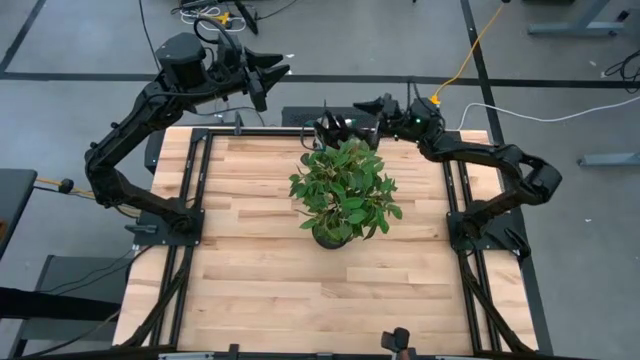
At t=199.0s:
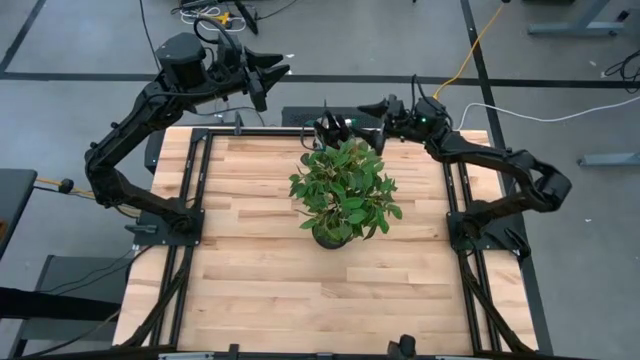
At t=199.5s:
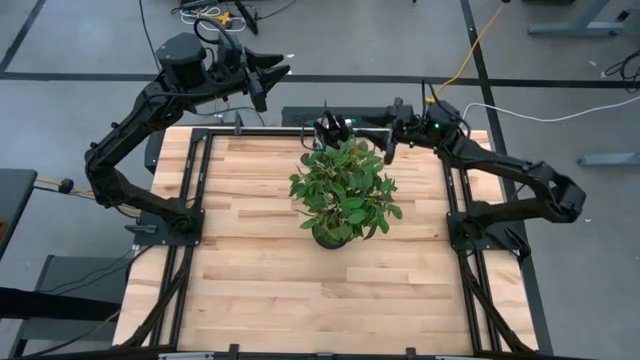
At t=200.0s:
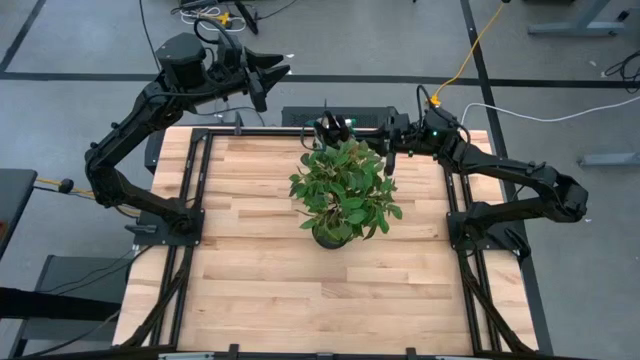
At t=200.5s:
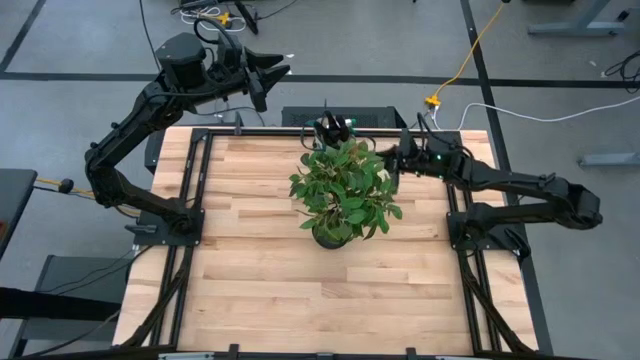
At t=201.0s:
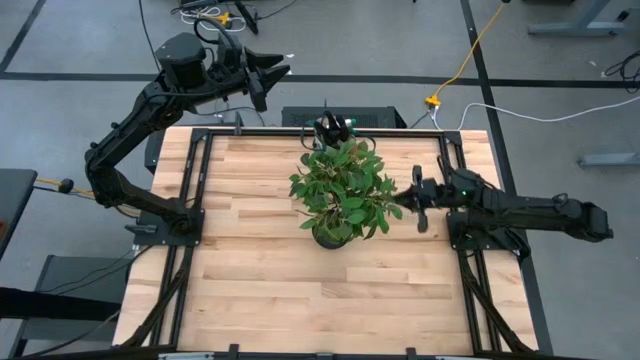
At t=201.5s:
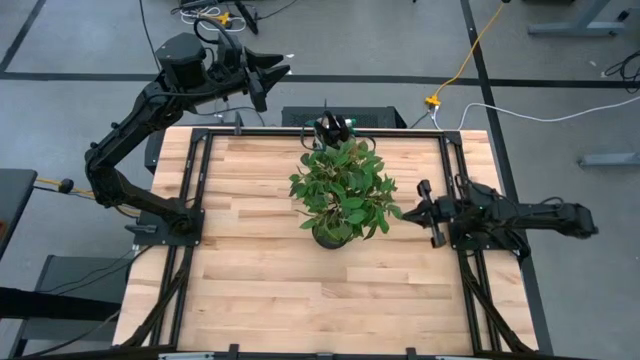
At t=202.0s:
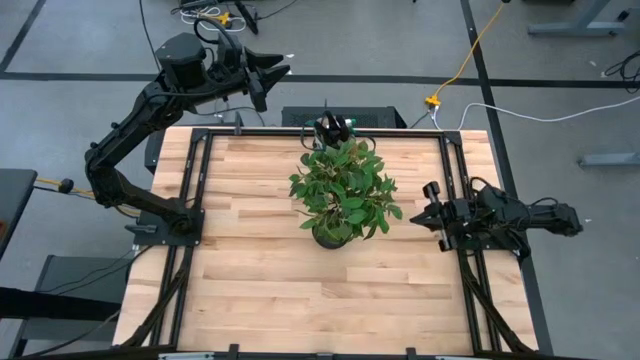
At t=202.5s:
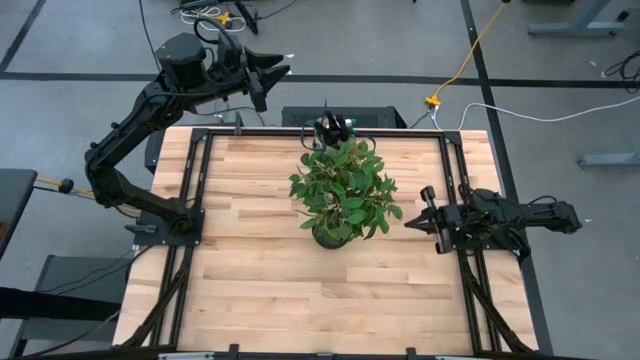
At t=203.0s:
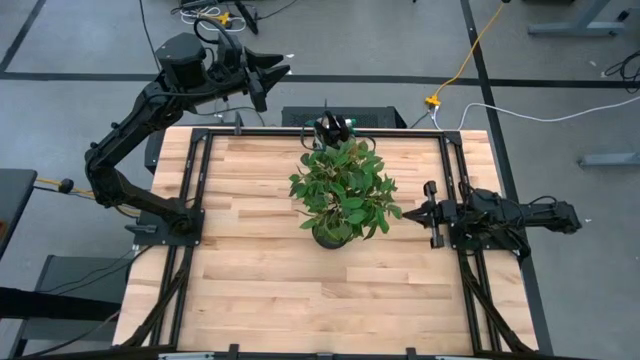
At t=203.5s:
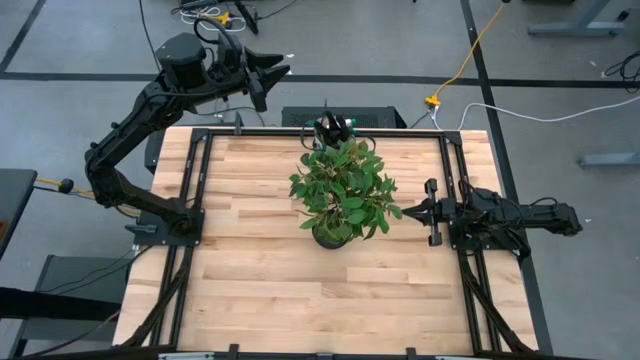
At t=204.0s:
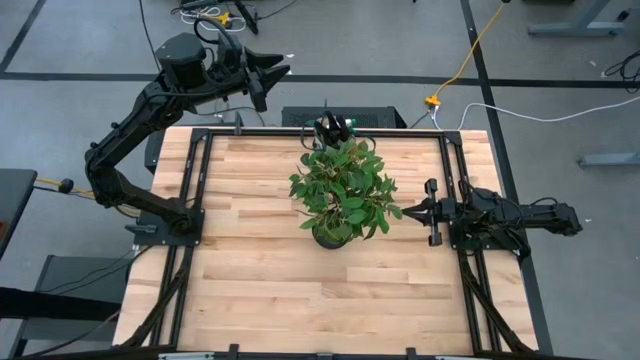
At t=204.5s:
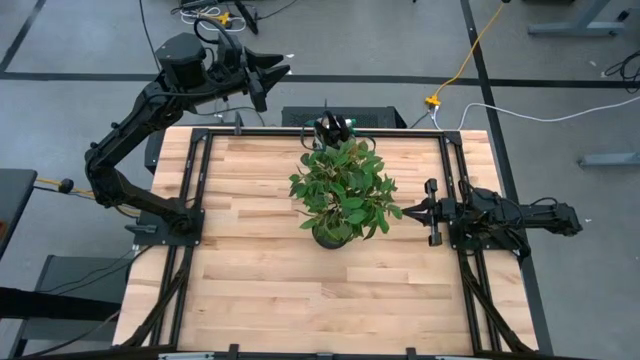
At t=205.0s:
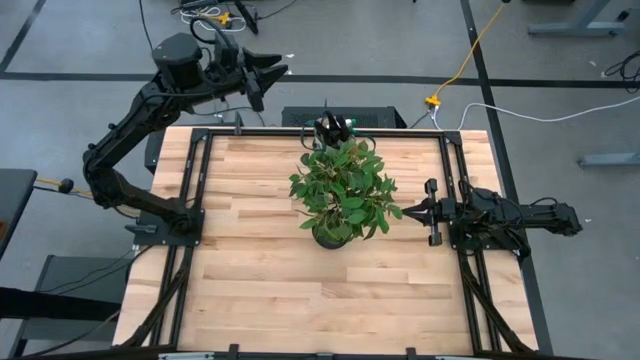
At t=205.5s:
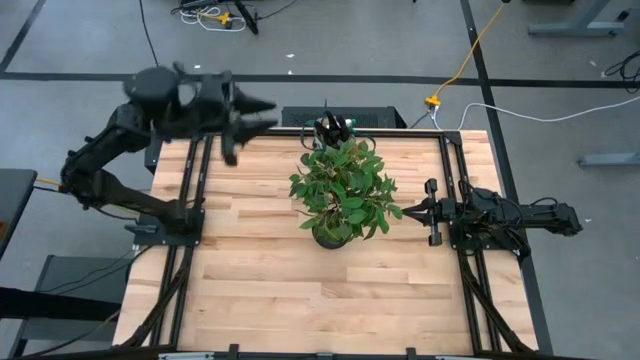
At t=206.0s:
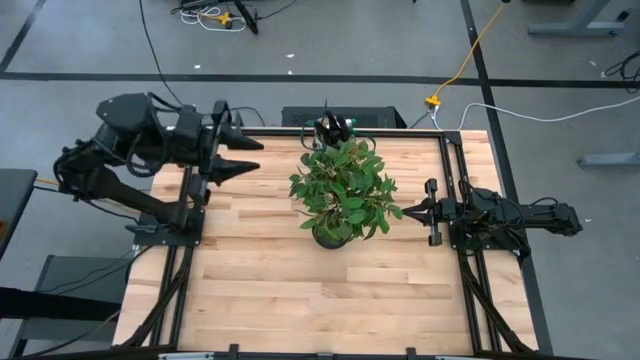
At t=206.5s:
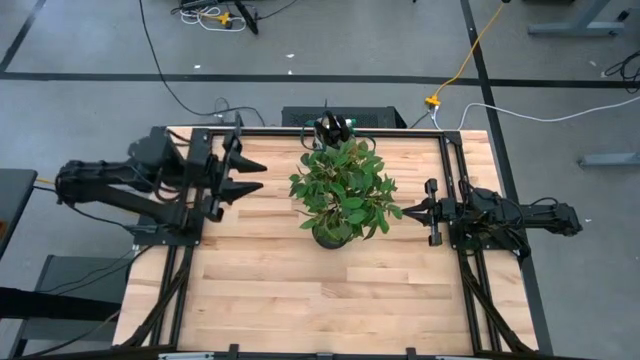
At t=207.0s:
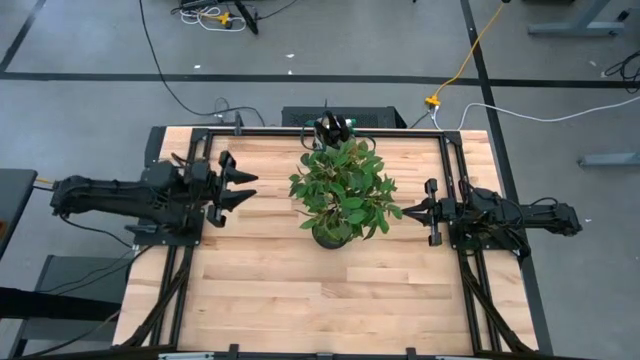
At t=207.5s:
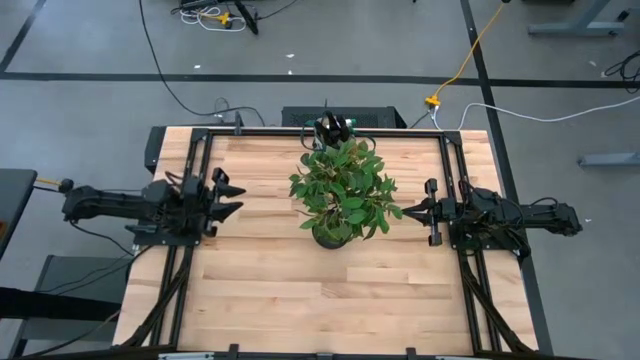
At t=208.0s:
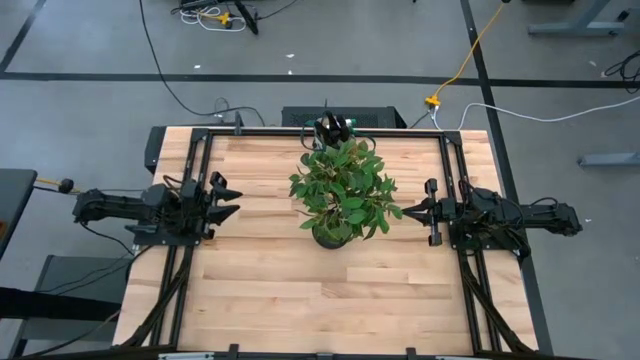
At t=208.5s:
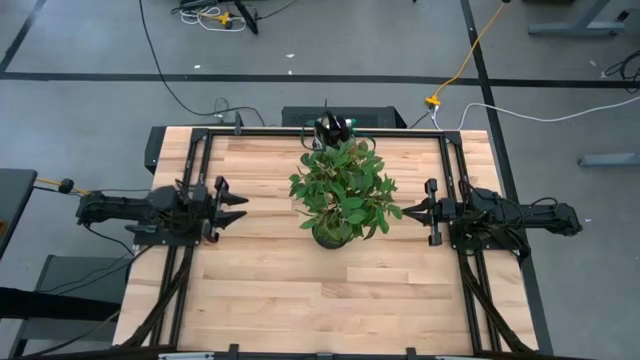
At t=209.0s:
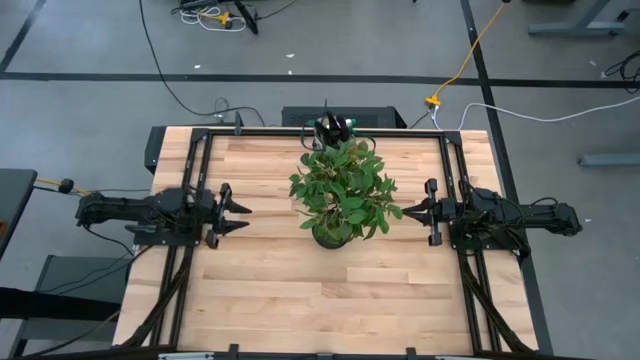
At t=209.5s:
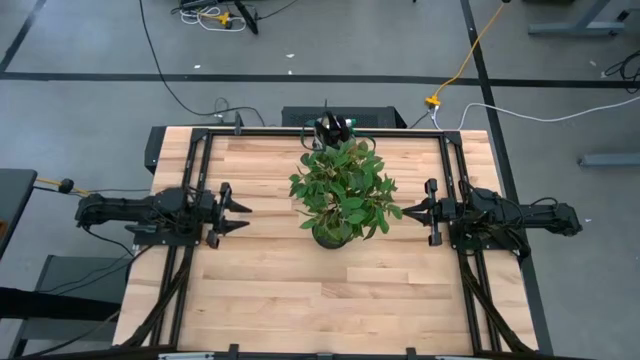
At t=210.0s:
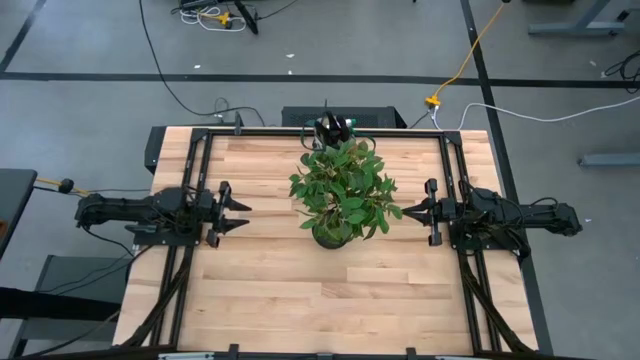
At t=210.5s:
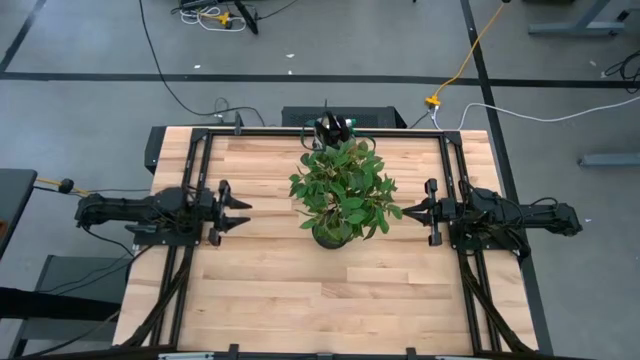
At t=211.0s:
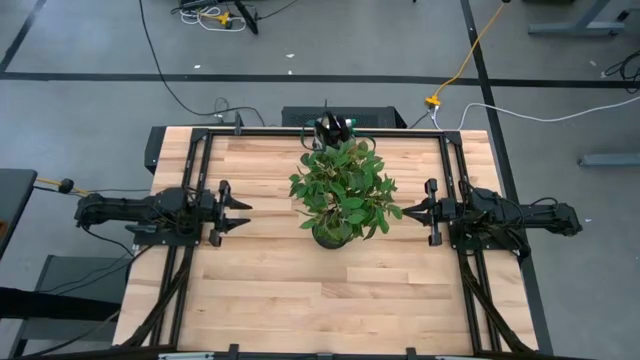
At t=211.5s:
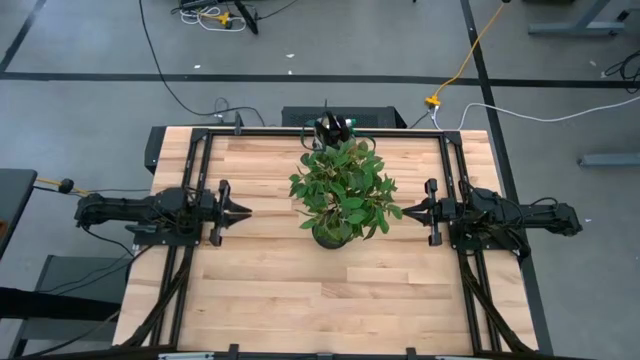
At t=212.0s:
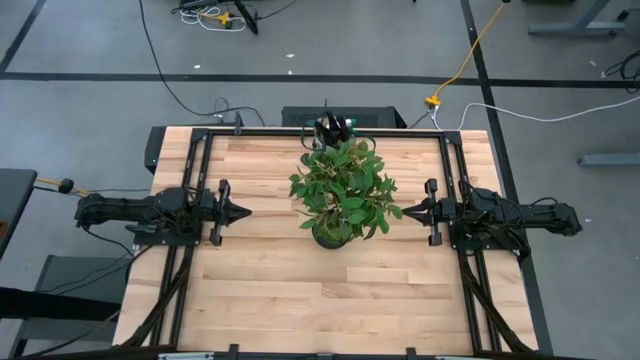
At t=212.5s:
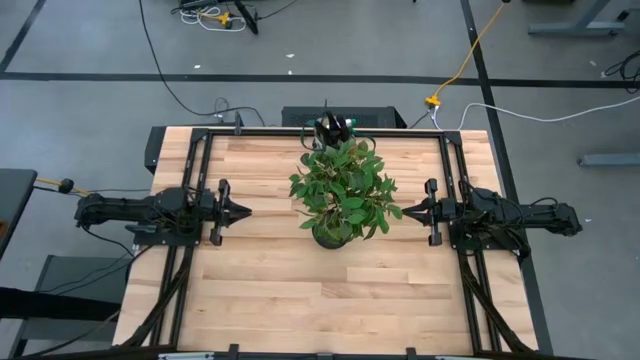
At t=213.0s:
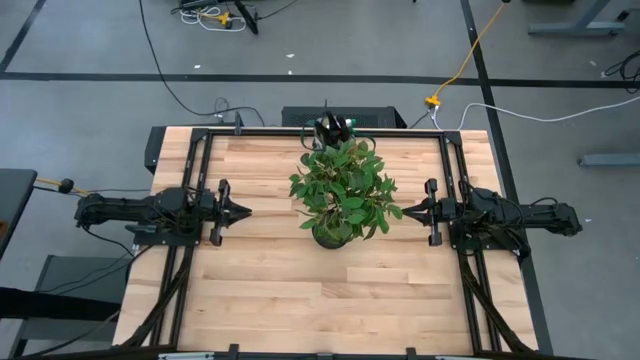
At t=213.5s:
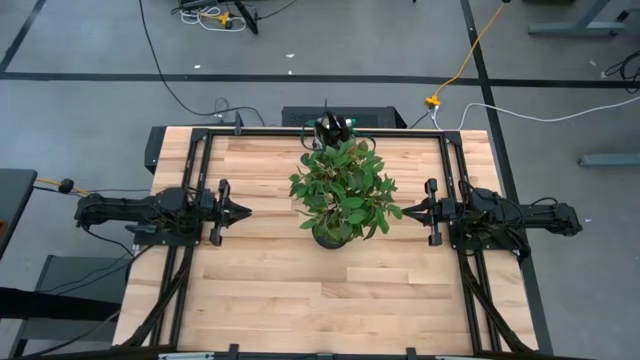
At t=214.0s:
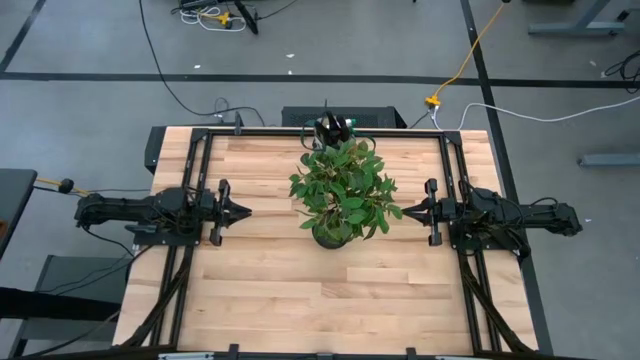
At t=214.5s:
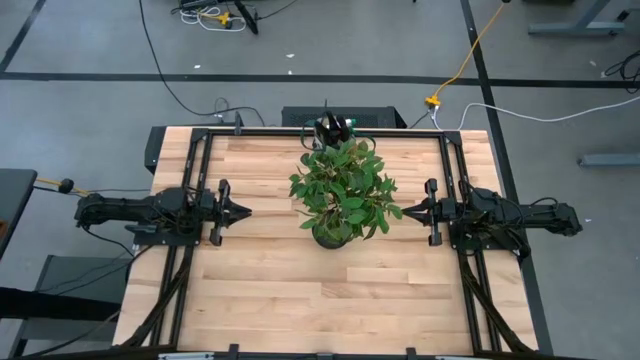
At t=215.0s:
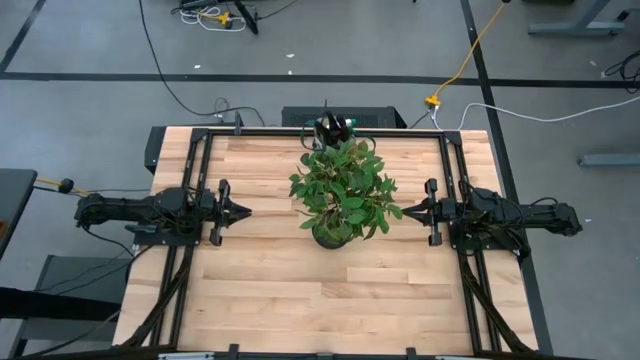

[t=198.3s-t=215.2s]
Task: Pick & Place Garden tools in Gardening bag
Return to Home Position

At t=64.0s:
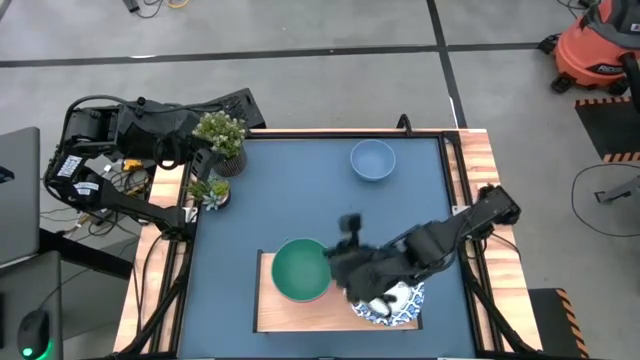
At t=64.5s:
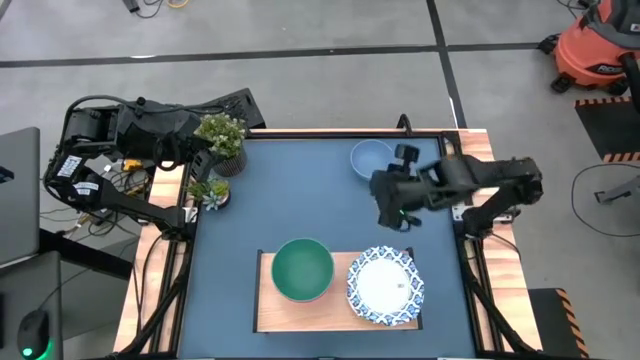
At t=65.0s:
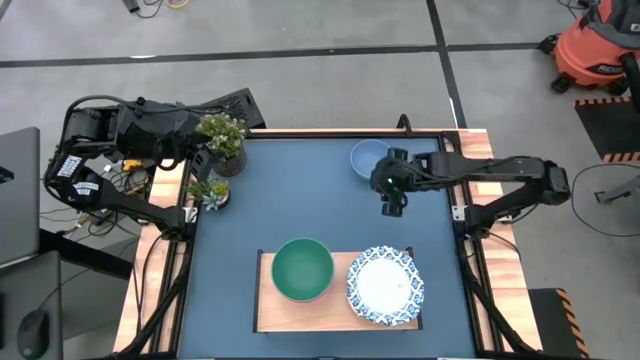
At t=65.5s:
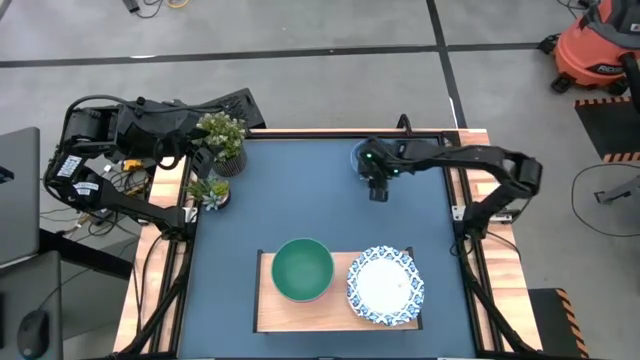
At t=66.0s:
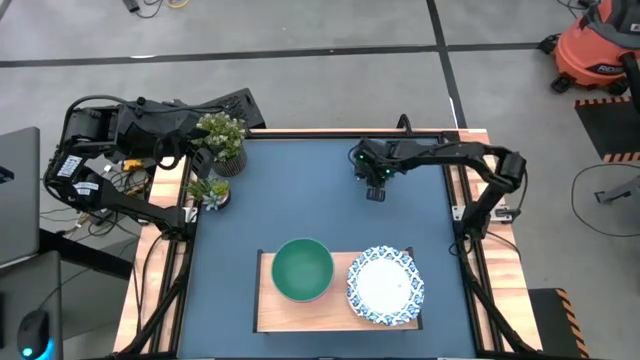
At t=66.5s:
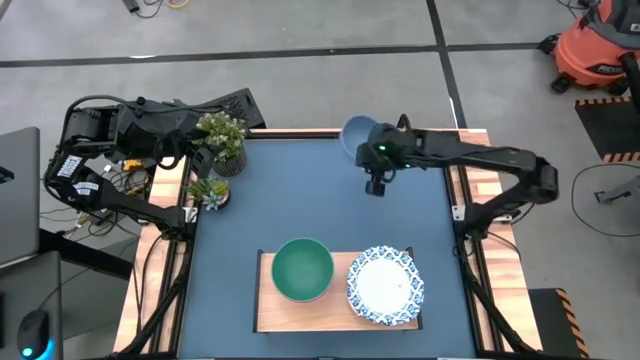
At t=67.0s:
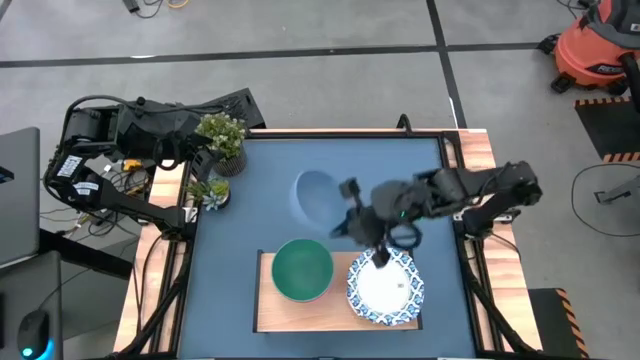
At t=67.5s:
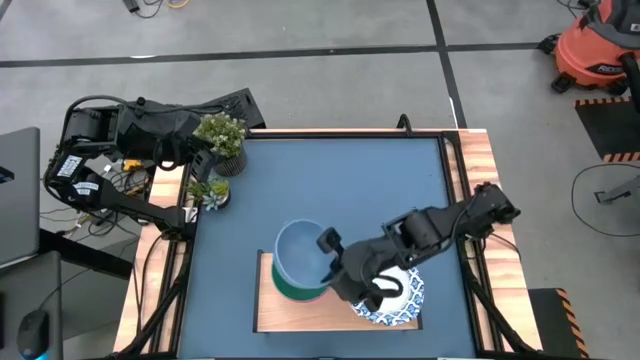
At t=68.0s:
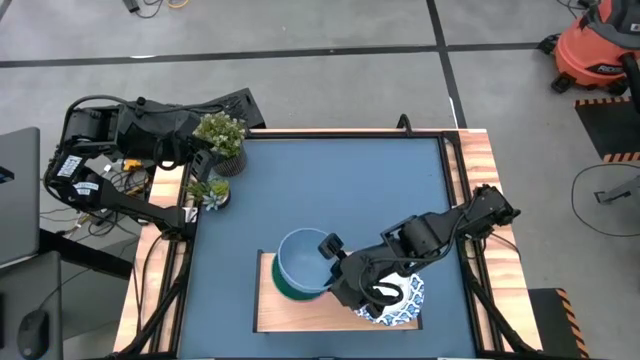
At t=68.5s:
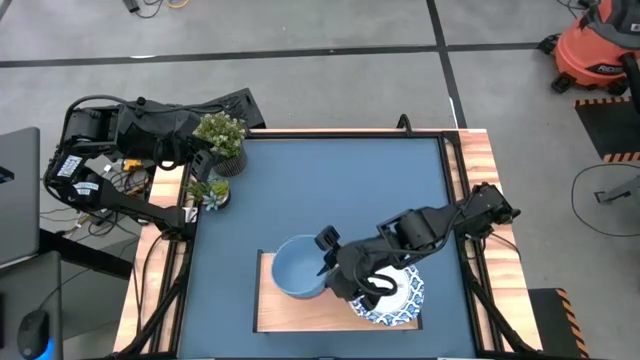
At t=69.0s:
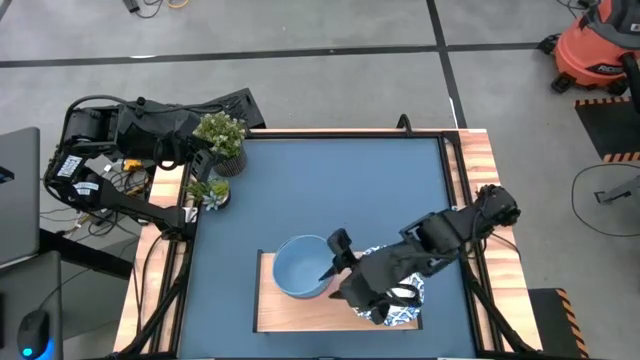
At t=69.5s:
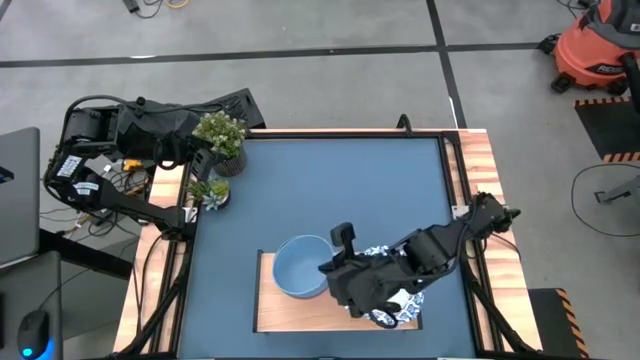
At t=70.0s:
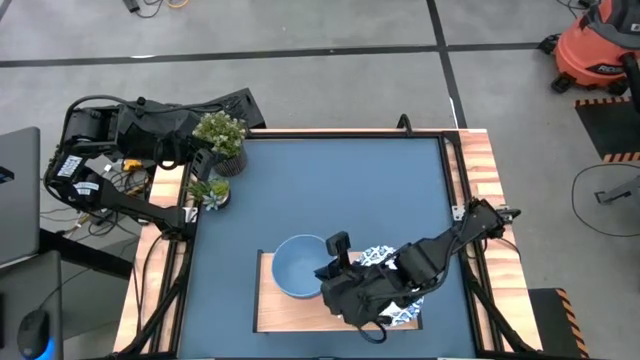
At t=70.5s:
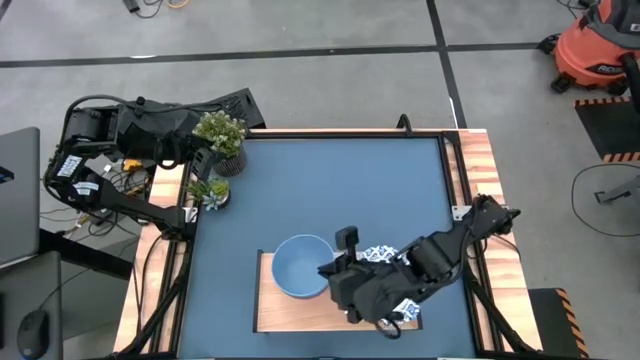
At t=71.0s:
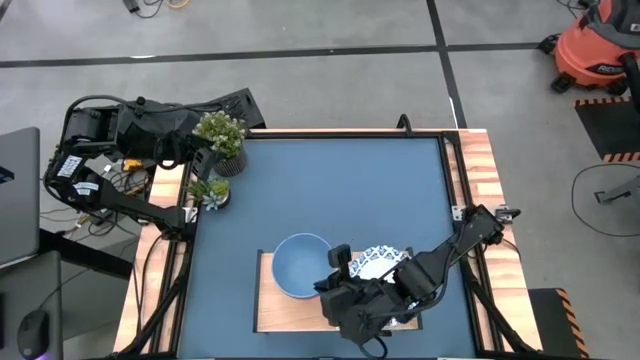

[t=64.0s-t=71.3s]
Task: Place and stack bowls onto a shelf
Stack the blue bowl on top of the green bowl on the shelf
